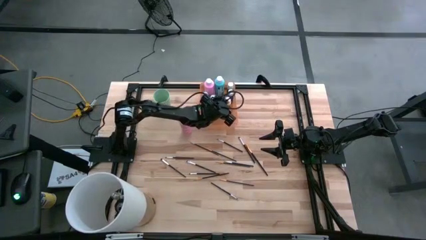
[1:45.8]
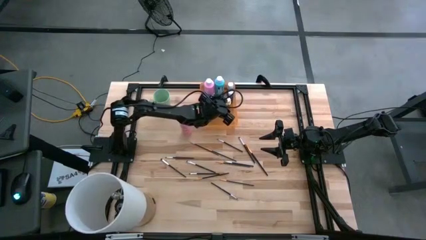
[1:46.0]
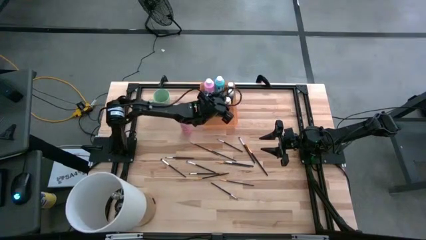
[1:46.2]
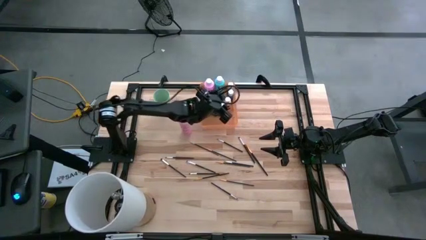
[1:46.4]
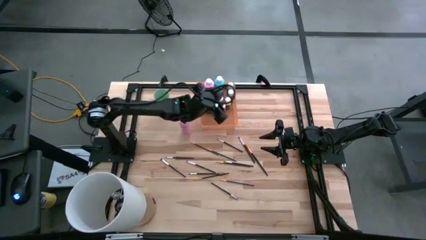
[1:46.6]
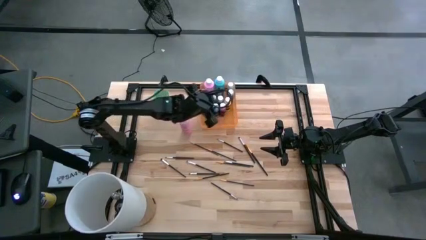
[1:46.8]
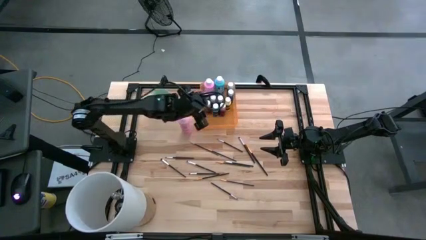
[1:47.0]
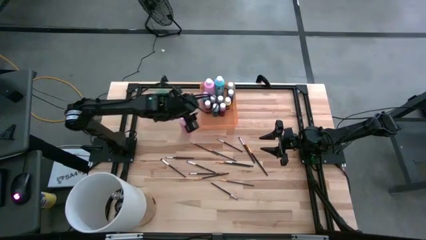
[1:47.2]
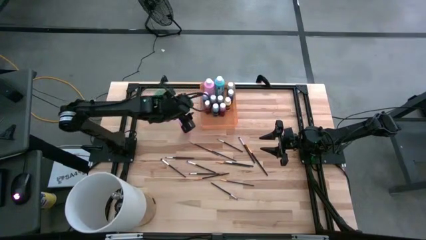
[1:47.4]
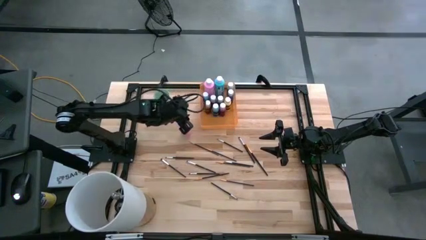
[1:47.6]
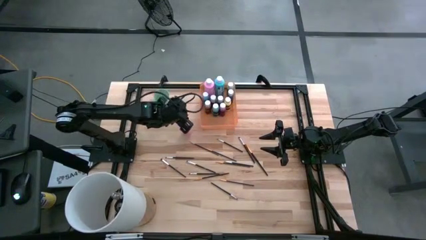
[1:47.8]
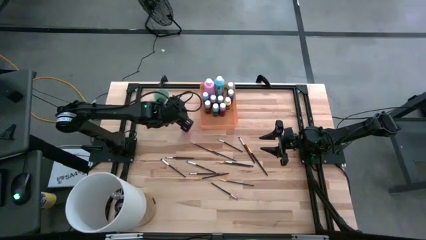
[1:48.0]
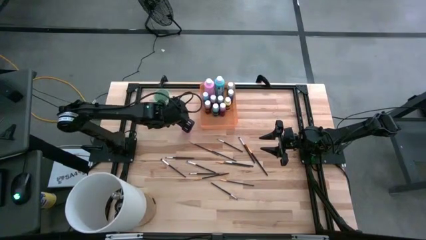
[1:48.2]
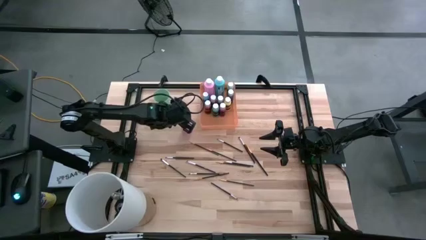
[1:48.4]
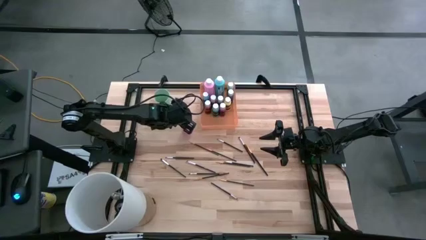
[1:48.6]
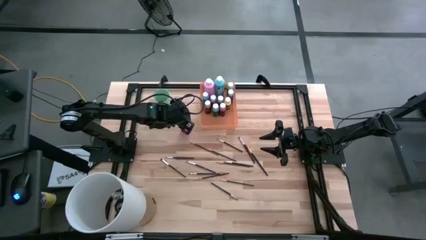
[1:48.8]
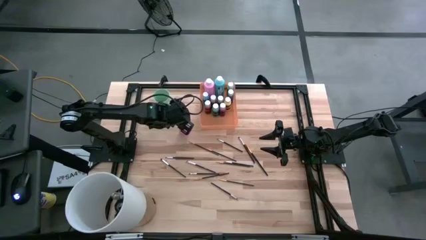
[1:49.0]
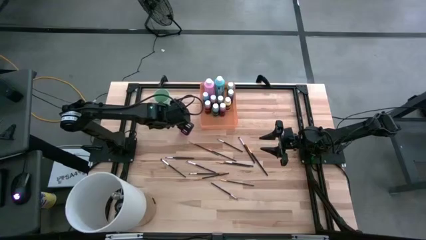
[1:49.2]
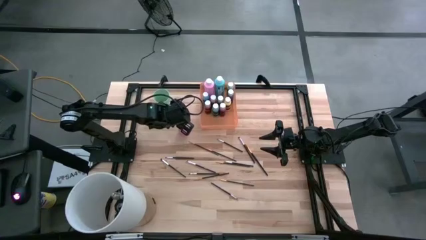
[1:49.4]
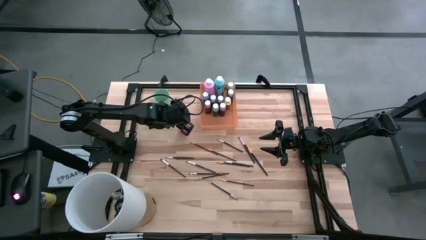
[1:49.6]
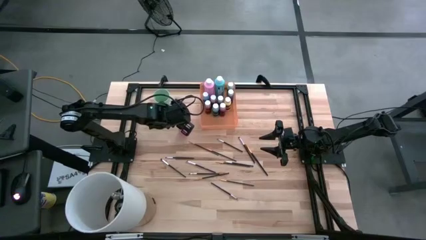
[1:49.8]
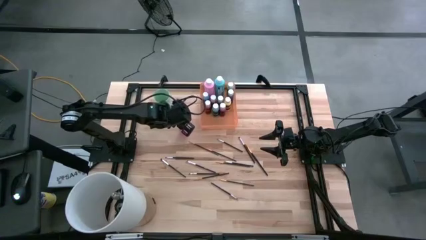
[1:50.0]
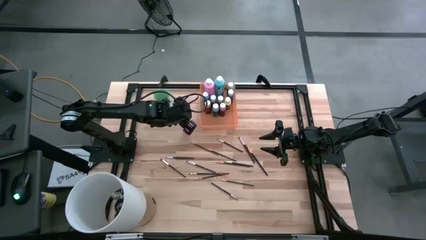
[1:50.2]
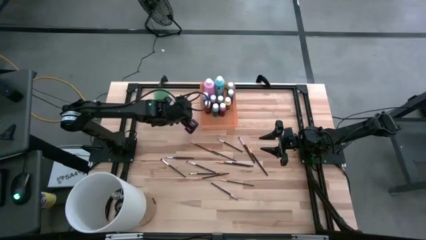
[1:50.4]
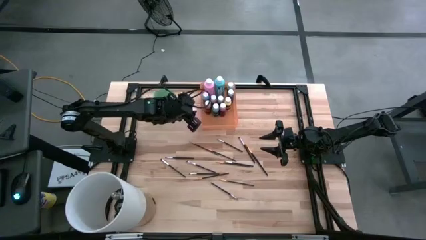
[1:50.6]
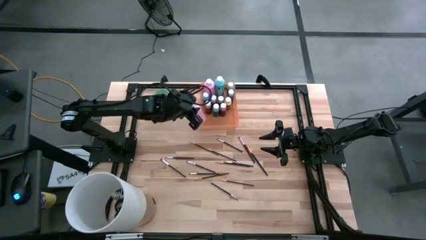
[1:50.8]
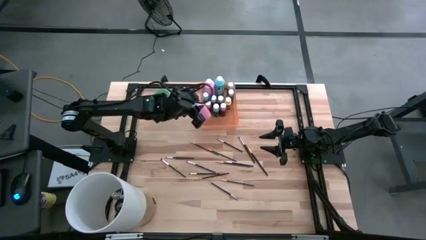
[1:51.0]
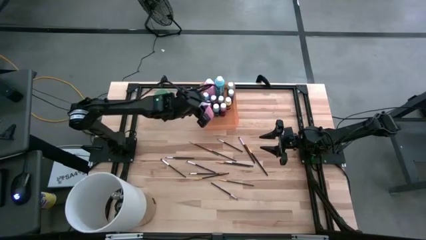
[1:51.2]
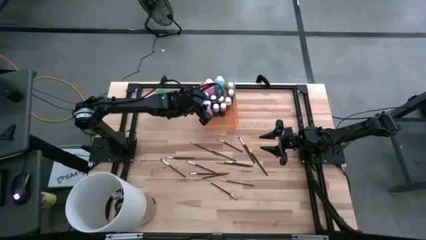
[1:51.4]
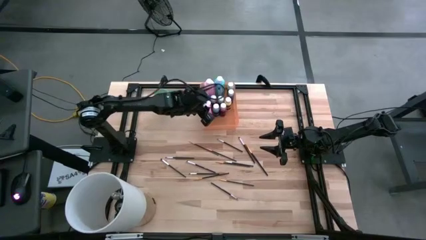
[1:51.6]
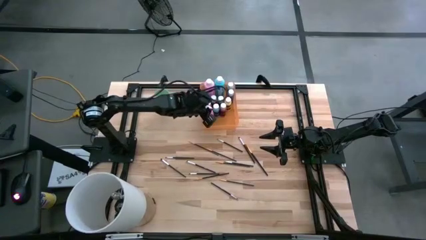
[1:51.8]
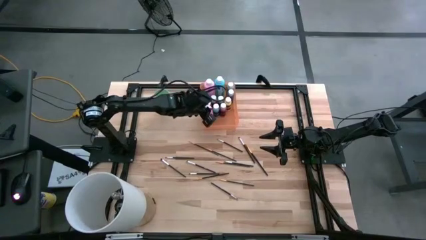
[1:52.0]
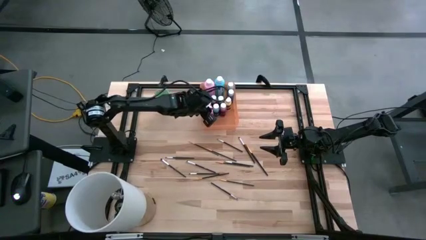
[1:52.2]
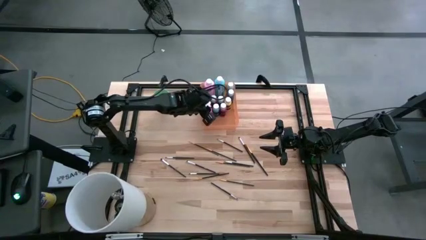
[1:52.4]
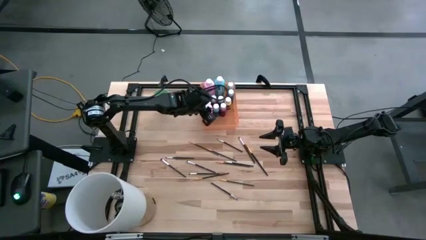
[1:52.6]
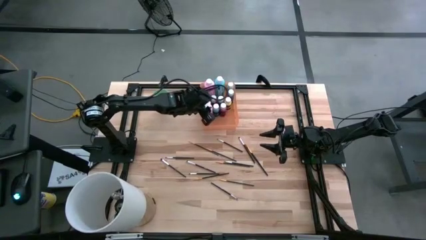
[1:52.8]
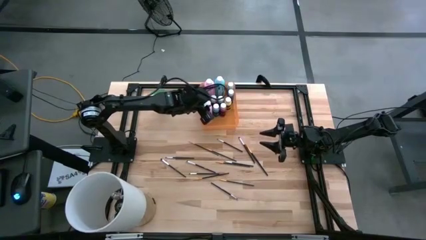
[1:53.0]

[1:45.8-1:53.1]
Task: Pick & Place Paint Supplies
Put the light pink pink paint bottle into the orange bin

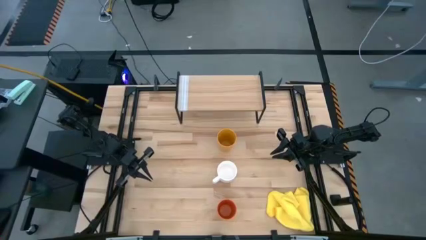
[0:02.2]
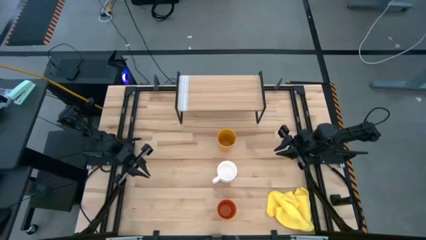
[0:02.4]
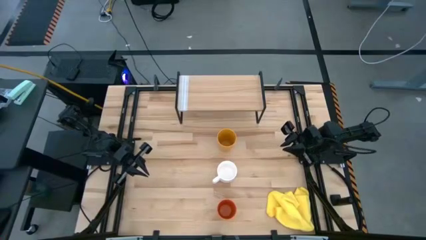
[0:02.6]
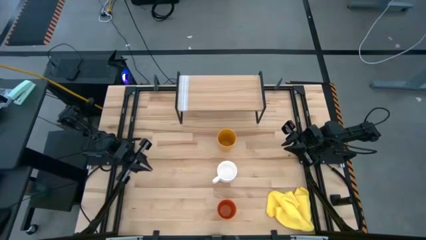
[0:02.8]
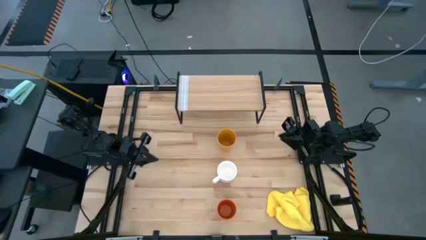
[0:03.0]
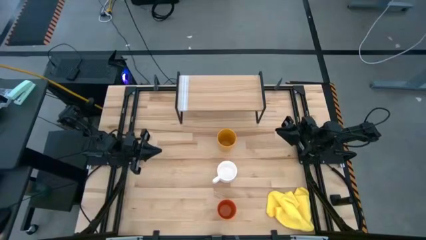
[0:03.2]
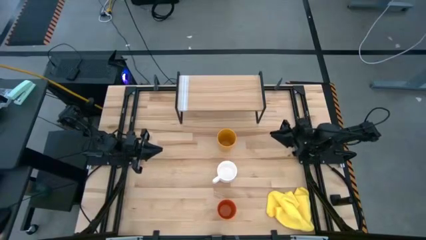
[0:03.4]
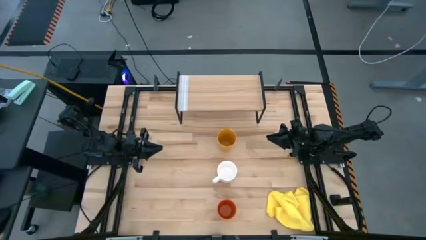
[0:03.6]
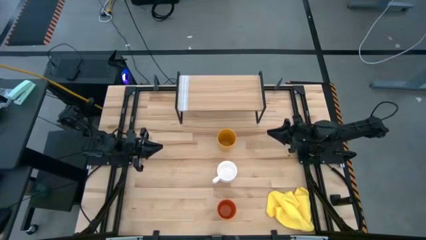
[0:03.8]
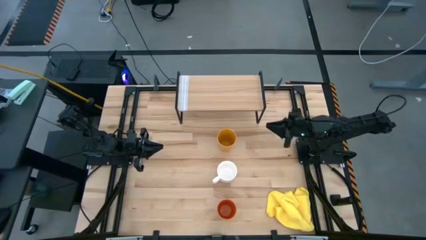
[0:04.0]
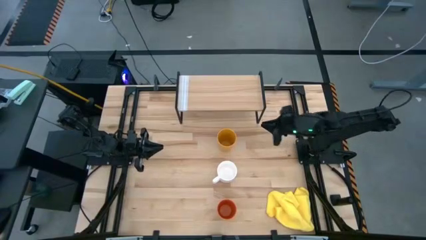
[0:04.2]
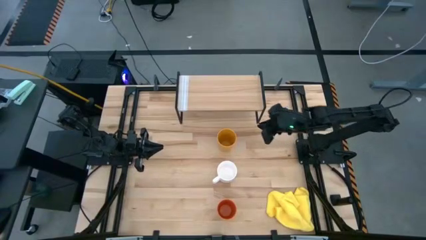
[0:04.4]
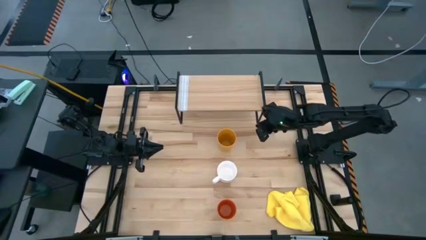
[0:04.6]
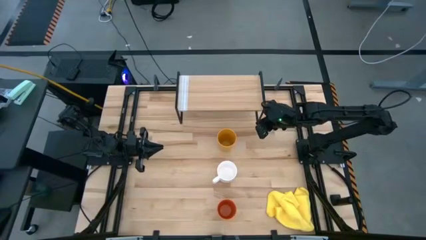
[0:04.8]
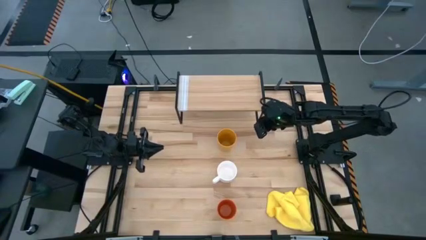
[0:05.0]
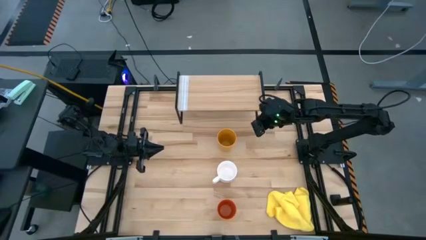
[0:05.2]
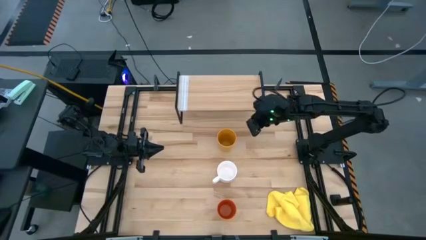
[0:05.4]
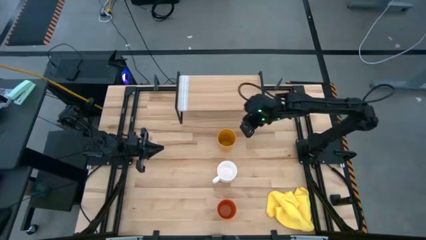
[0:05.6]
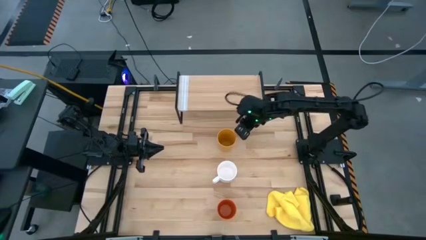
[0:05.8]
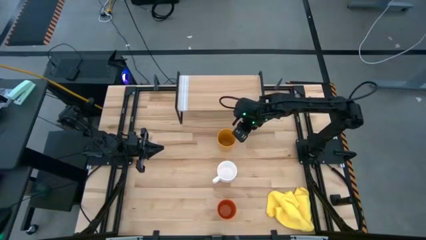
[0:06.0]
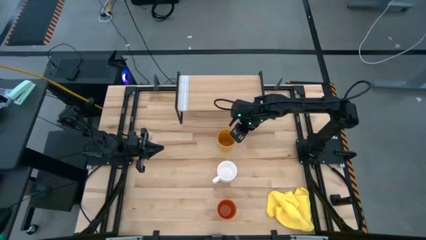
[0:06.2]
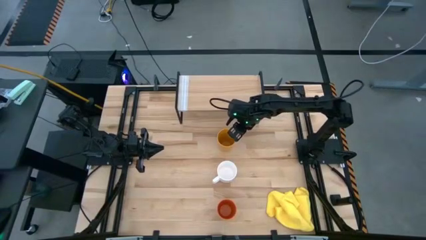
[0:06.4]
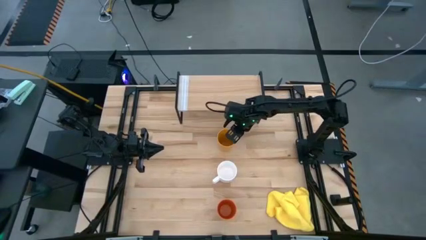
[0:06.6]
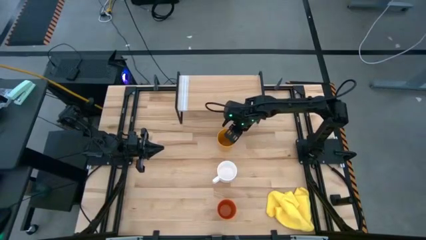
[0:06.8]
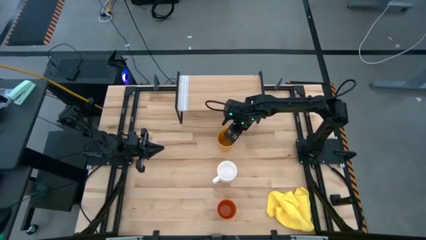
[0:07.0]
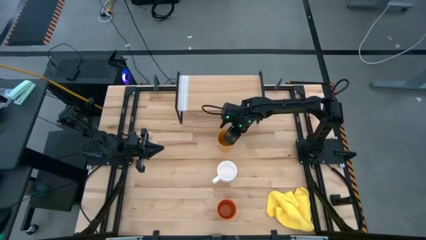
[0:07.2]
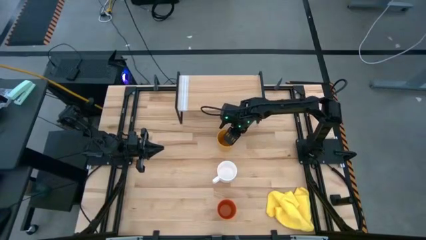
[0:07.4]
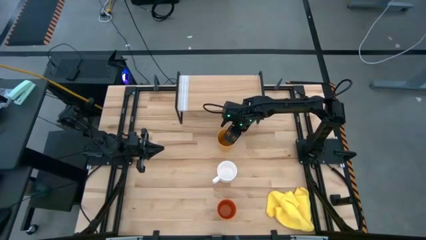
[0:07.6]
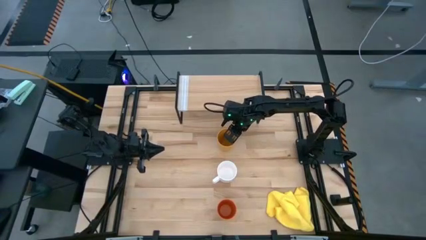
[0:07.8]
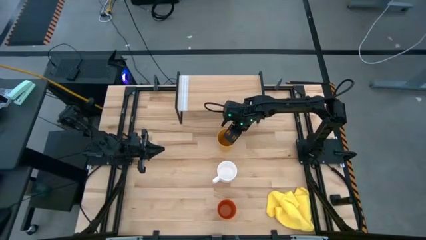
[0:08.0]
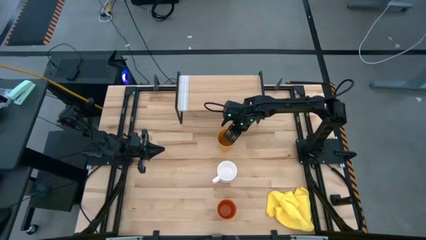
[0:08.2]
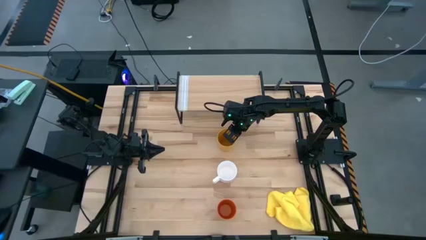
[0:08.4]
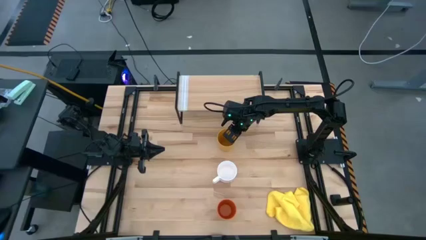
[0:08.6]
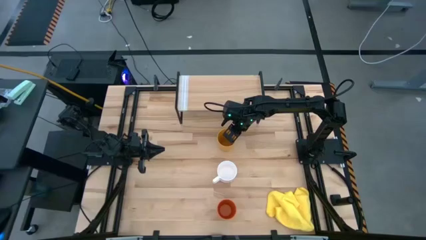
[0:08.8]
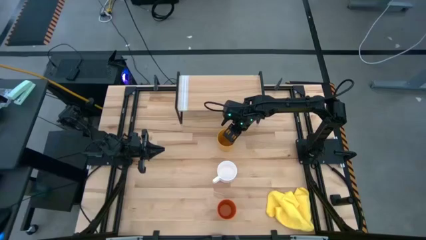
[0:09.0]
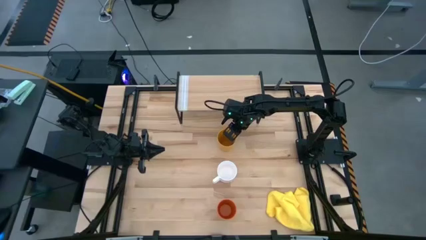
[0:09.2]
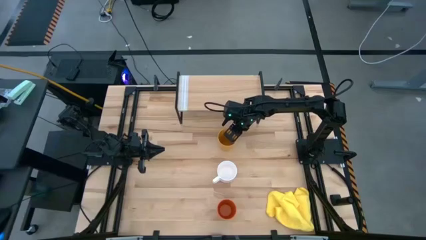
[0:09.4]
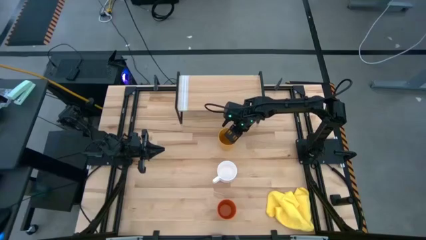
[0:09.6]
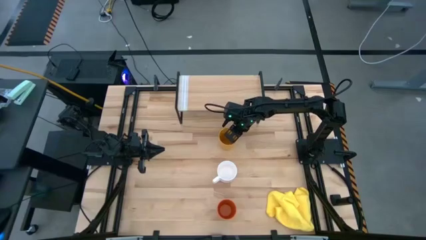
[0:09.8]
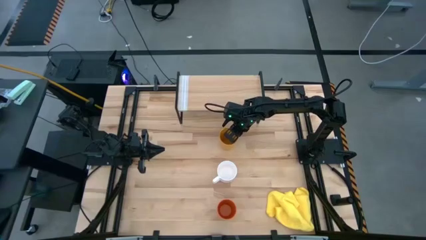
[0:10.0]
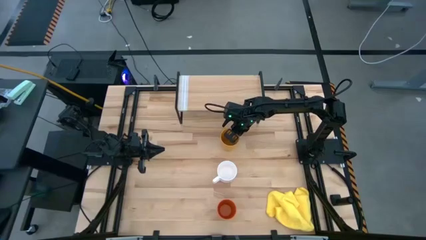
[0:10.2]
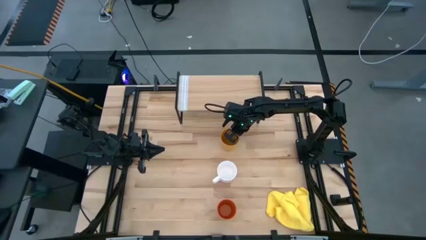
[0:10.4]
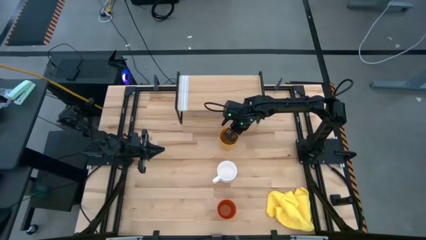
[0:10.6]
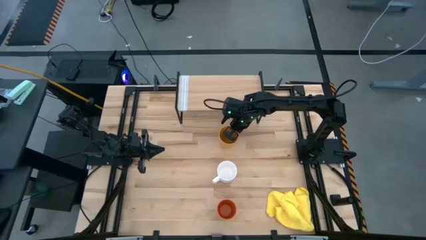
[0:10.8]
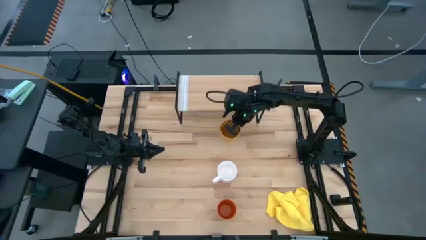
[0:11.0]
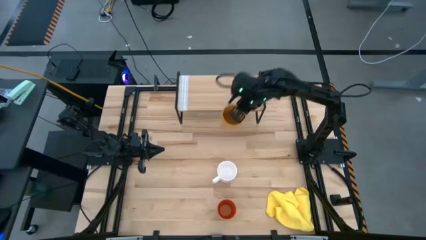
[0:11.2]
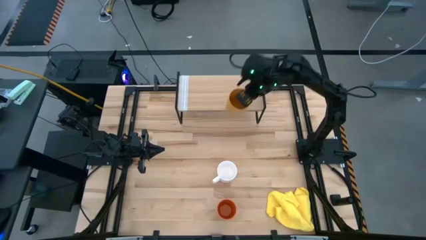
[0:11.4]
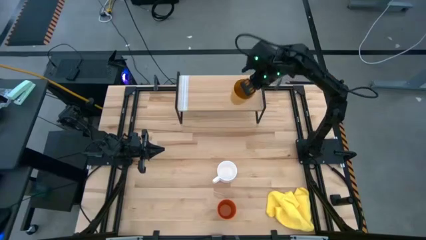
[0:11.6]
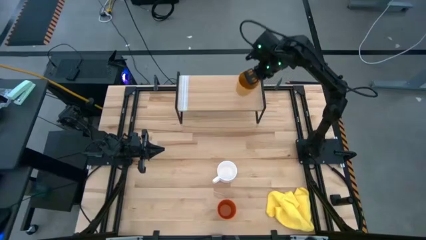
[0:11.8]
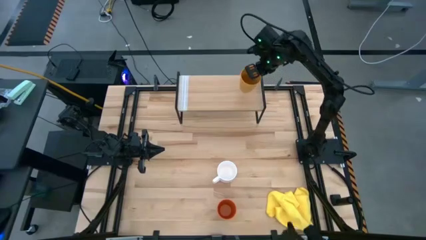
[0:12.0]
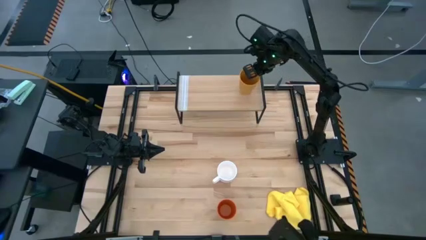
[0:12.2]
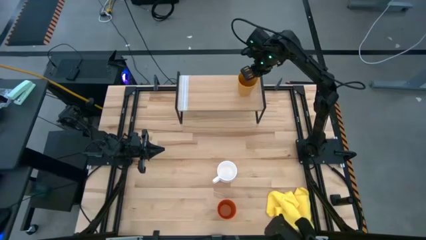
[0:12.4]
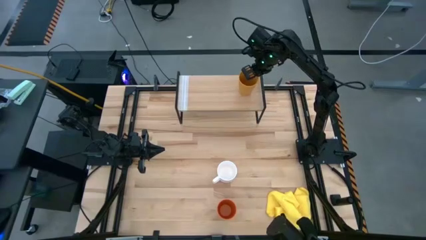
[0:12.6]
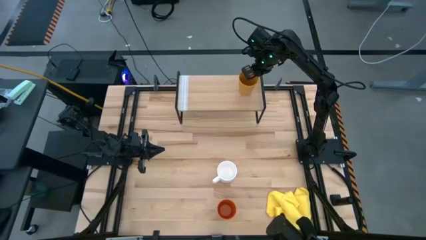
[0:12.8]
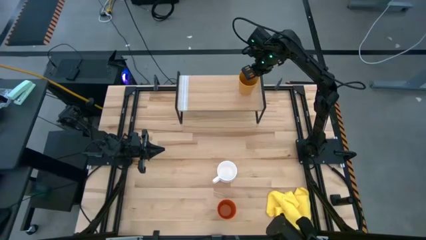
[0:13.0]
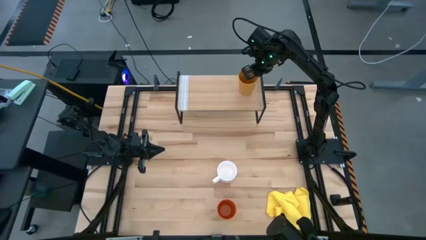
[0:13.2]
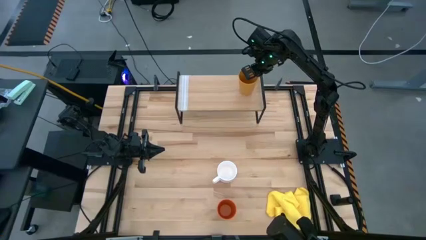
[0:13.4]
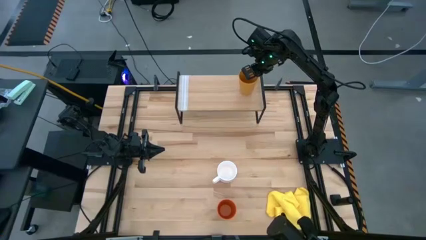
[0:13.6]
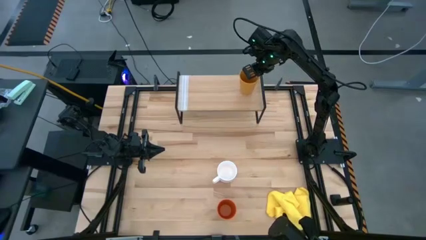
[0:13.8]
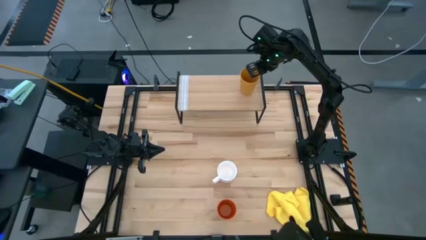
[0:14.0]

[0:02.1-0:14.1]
Task: Stack small to large cups/mugs on shelf
Put the yellow cup on the shelf
